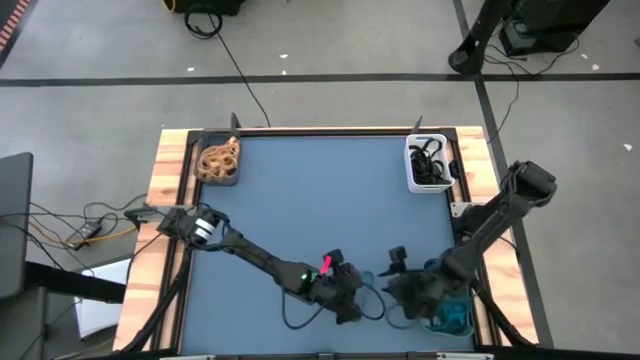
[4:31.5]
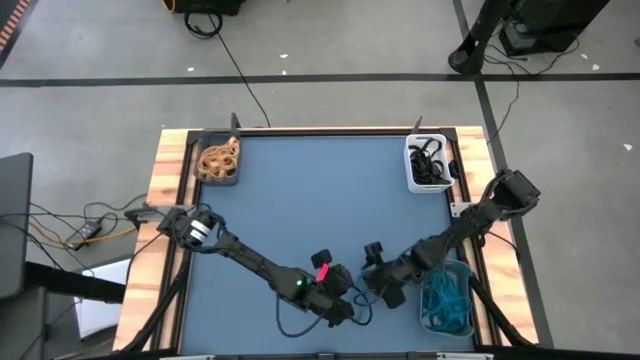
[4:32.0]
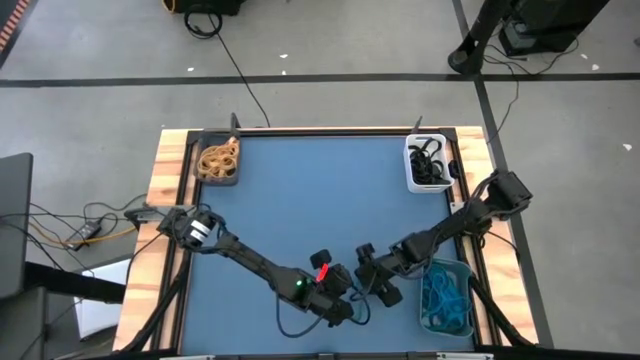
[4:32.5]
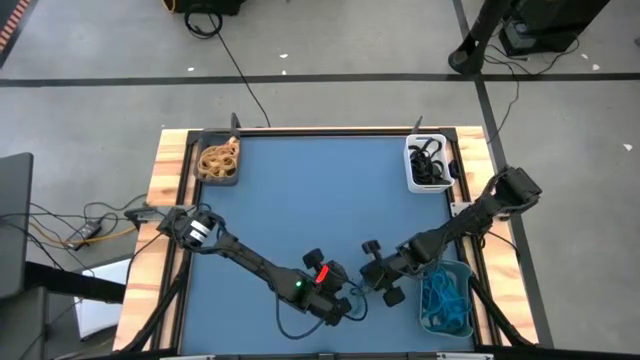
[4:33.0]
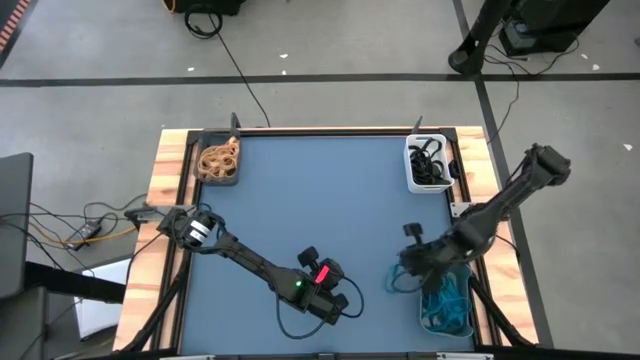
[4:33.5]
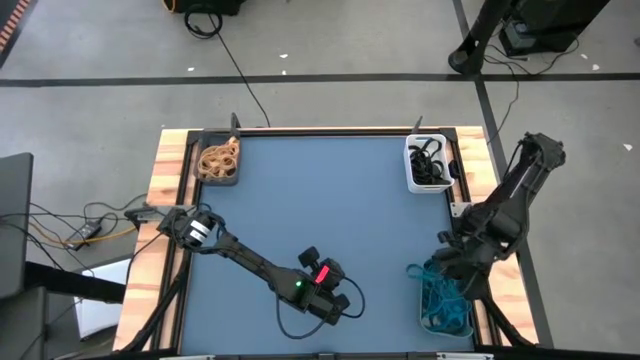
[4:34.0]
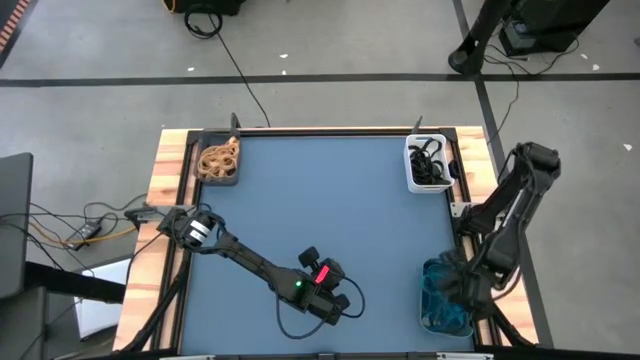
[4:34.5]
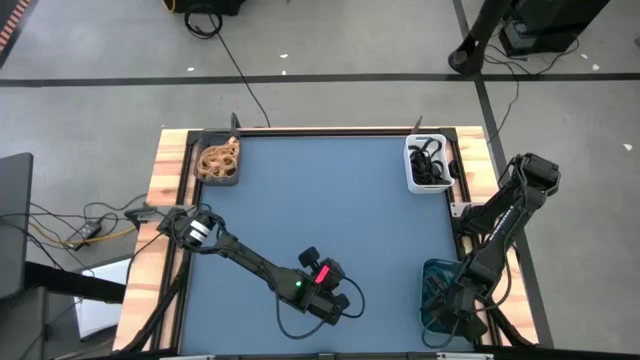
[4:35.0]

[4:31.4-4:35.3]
Task: Sort rubber bands into baskets
Put the blue rubber band into the blue bin

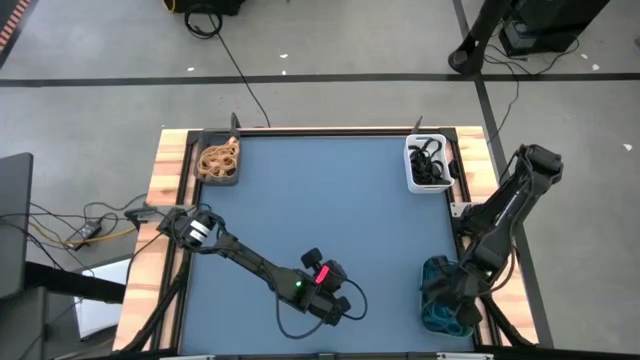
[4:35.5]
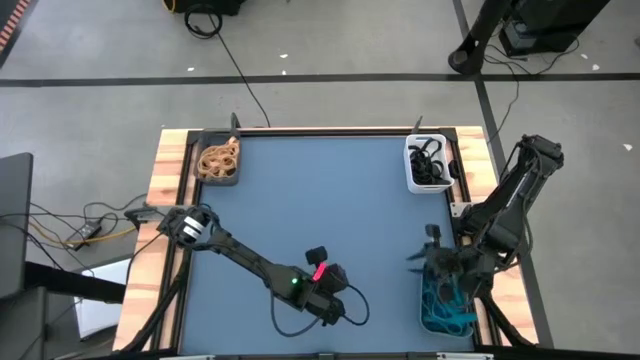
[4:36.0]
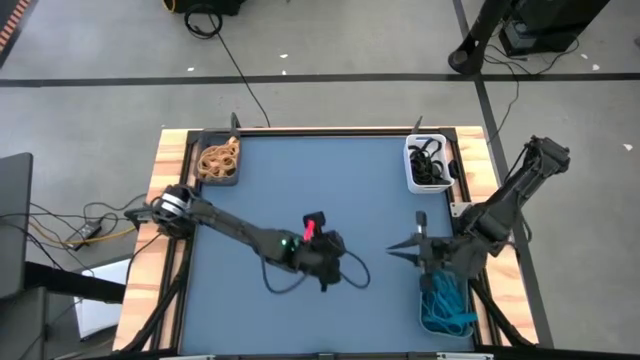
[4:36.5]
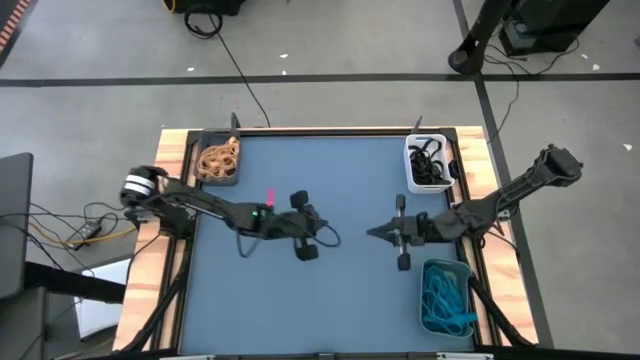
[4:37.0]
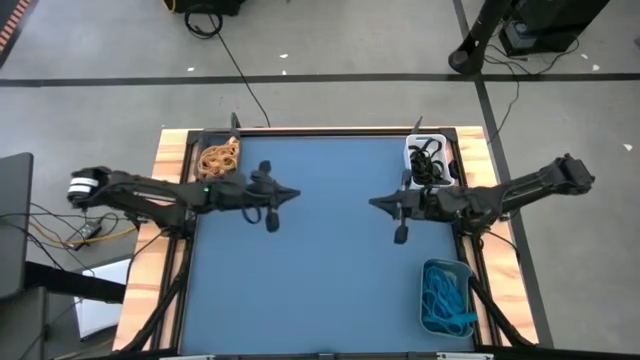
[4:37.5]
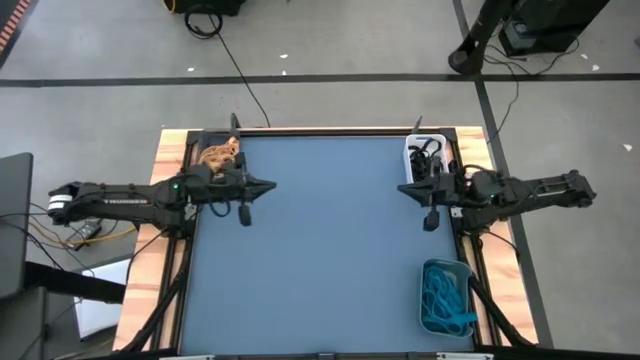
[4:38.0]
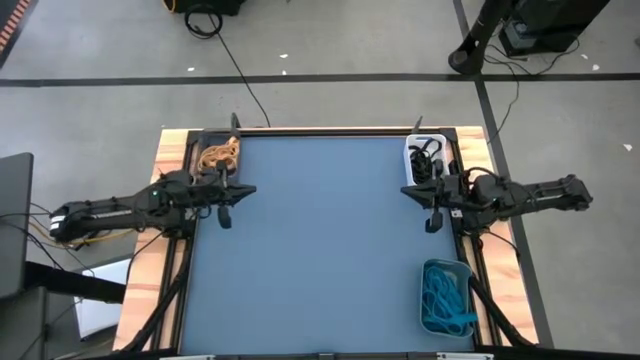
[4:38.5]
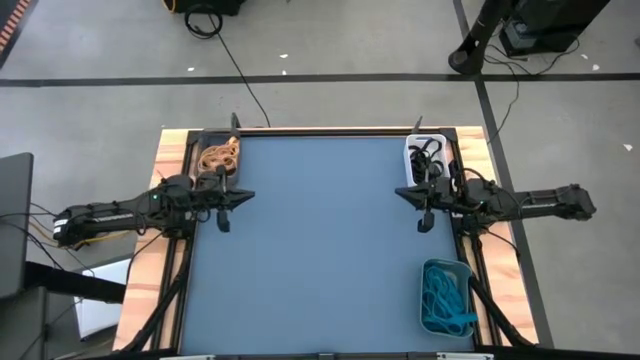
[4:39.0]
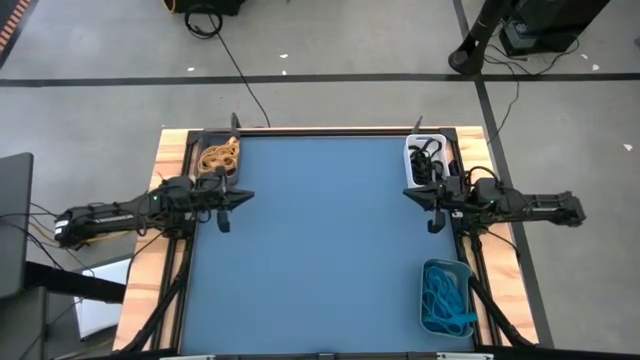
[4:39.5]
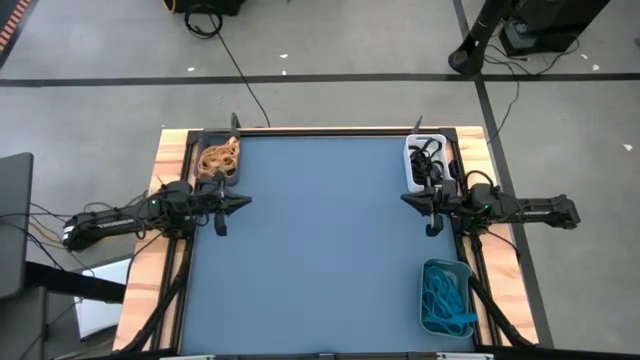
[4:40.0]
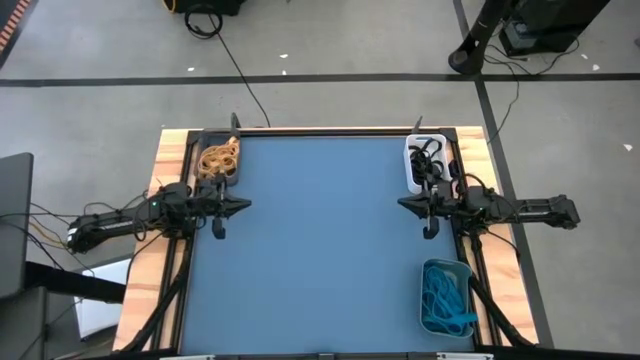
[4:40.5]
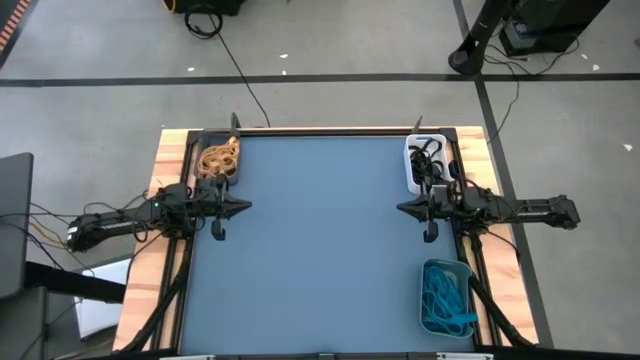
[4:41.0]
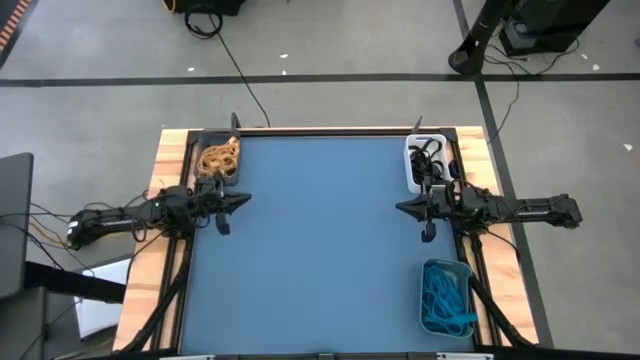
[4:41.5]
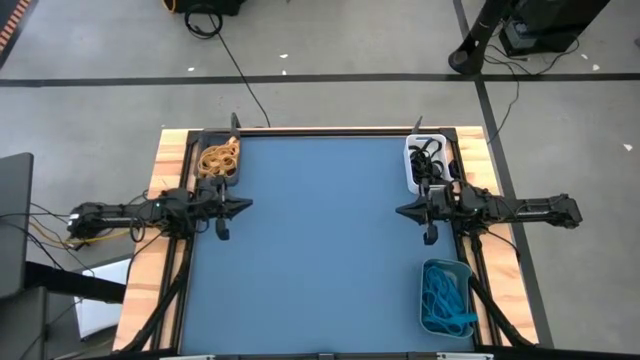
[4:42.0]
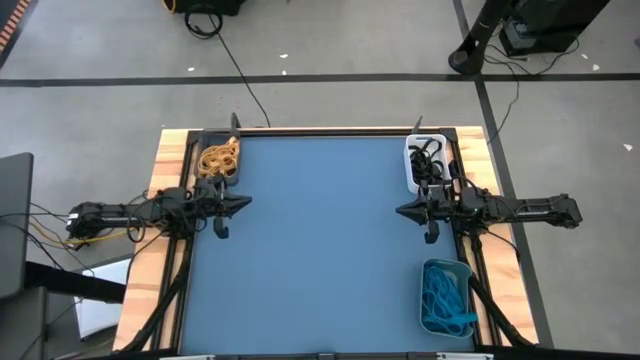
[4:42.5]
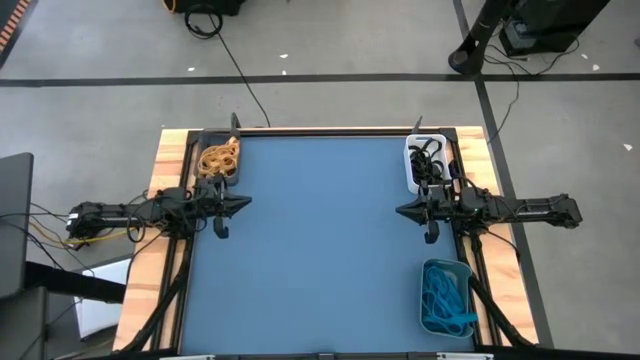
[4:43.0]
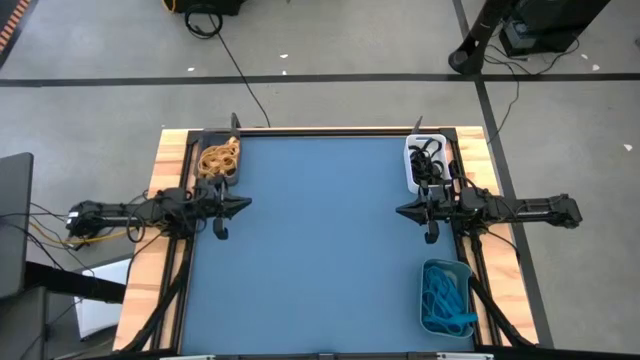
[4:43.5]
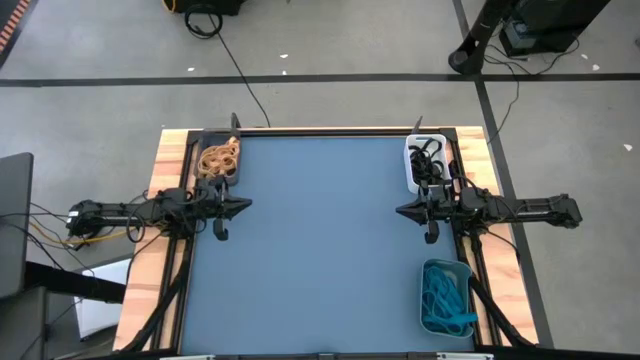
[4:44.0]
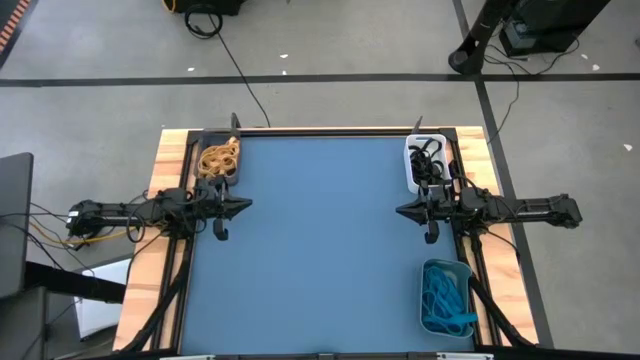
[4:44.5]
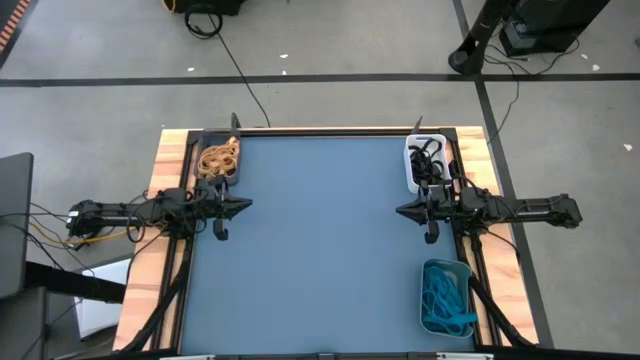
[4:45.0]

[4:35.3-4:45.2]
Return to Home Position

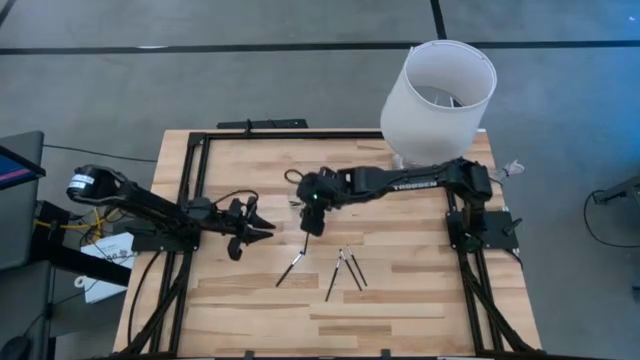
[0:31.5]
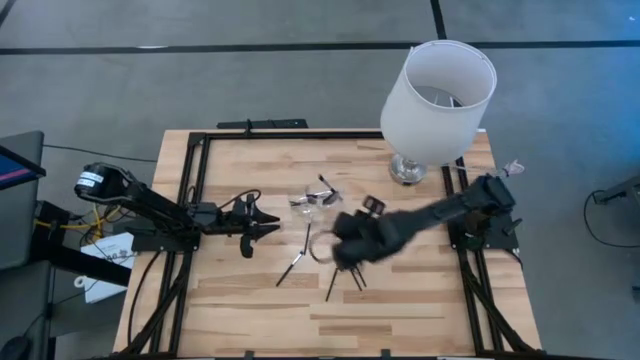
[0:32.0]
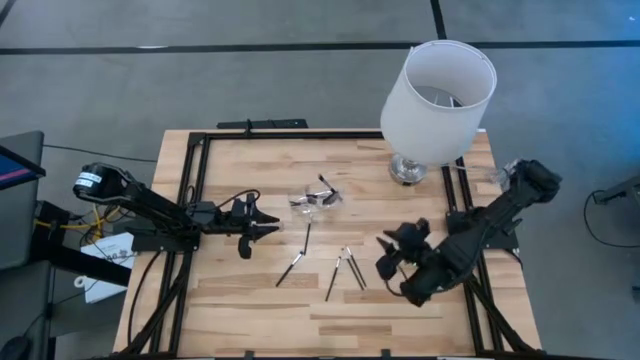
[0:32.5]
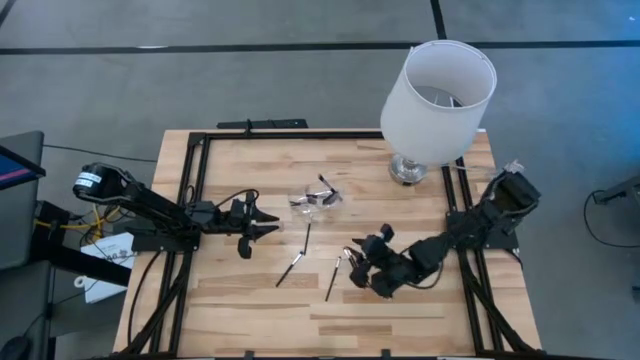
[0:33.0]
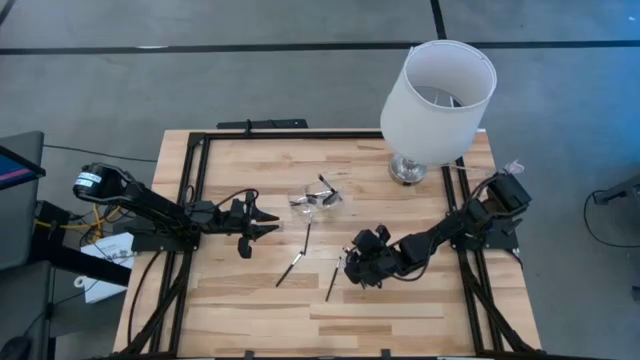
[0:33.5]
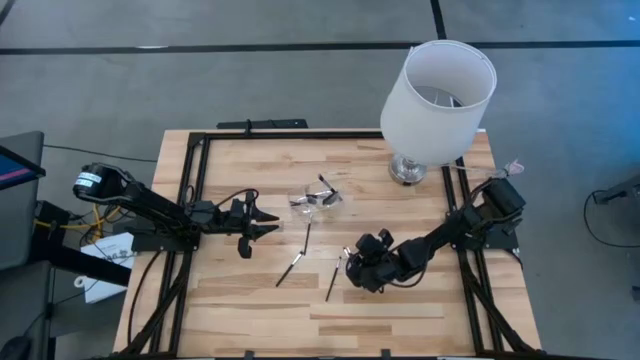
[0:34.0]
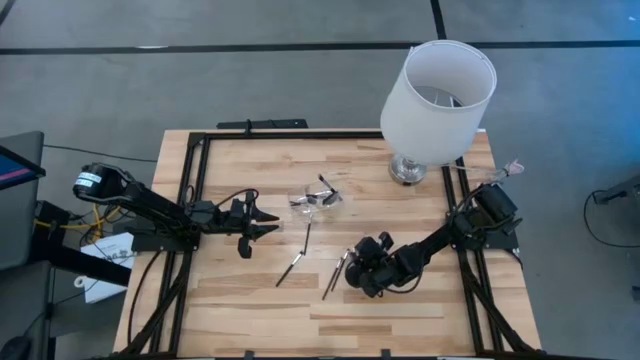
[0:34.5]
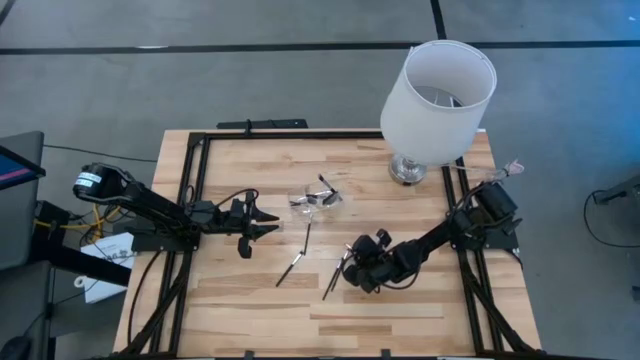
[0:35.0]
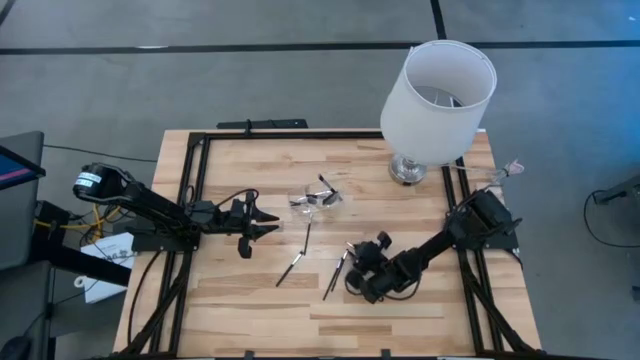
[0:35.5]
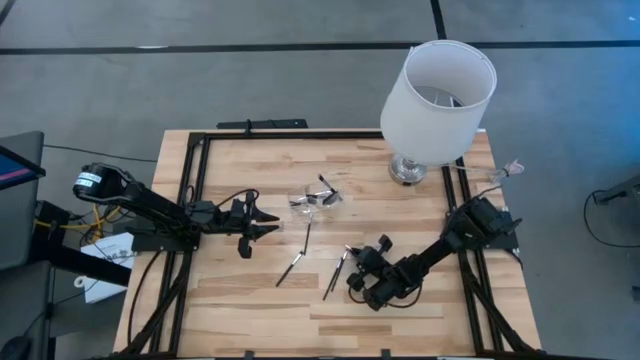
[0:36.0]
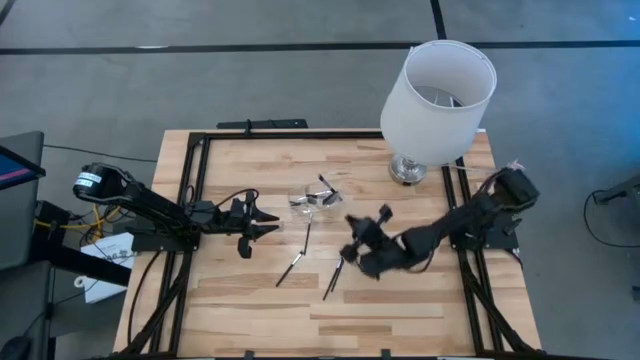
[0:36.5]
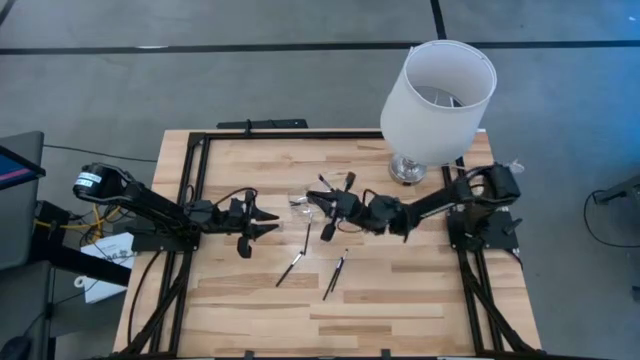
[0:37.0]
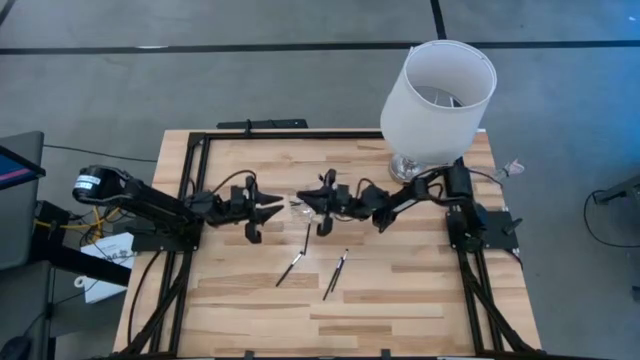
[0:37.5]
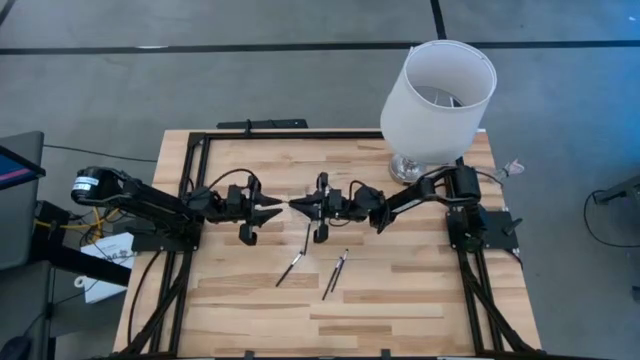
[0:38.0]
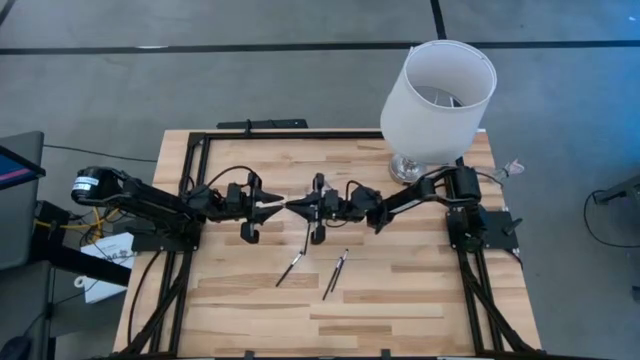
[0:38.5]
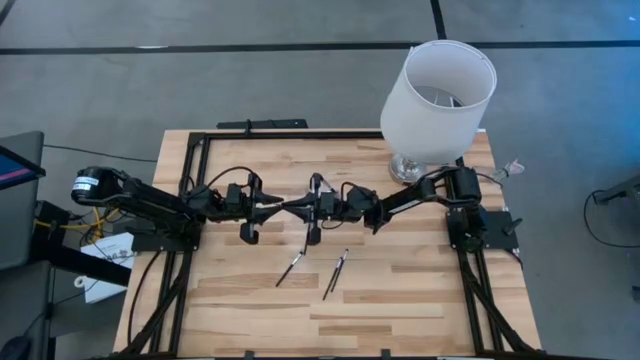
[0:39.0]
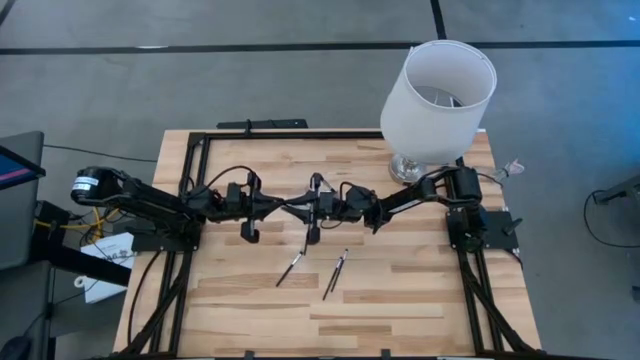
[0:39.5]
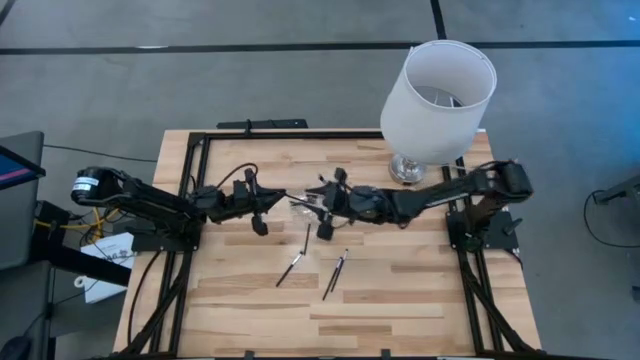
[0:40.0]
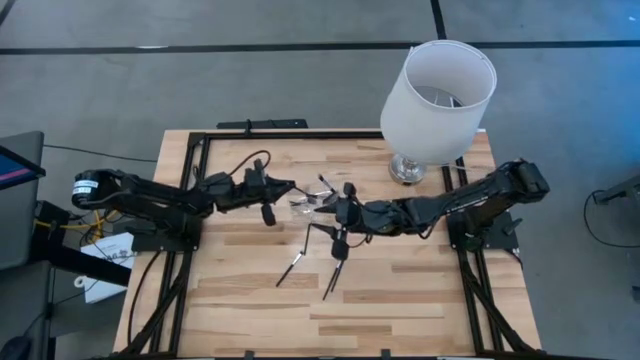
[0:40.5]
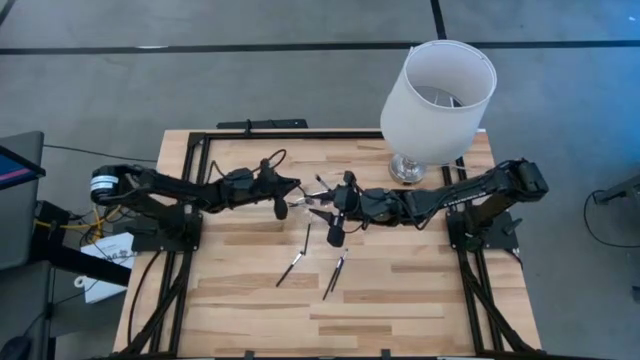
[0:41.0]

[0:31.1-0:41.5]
Task: Pick & Place Makeup Supplies
Put the black makeup brush into the transparent organizer
